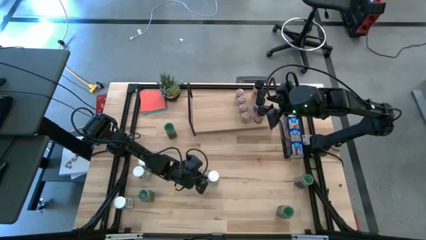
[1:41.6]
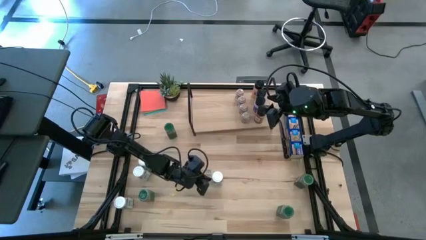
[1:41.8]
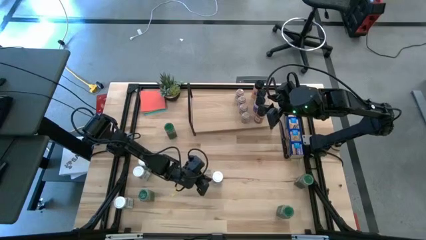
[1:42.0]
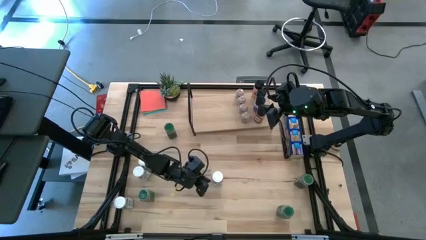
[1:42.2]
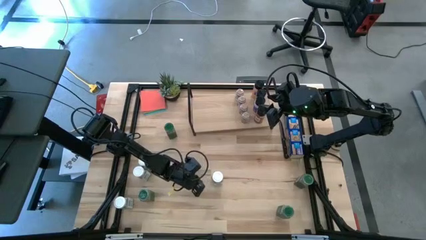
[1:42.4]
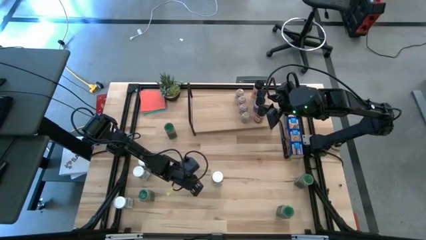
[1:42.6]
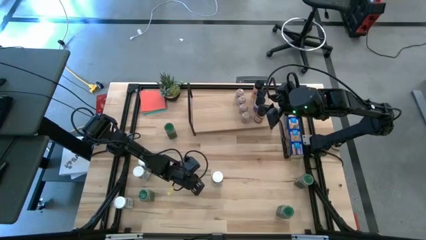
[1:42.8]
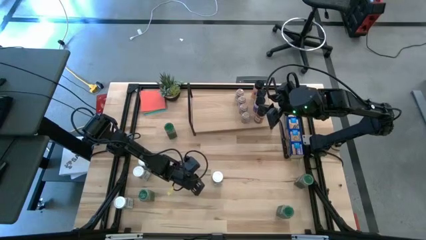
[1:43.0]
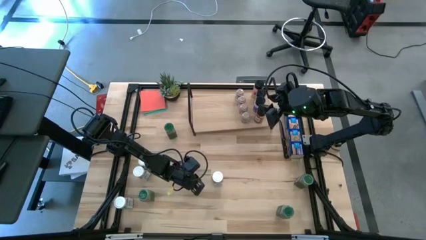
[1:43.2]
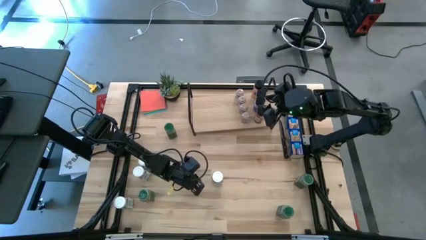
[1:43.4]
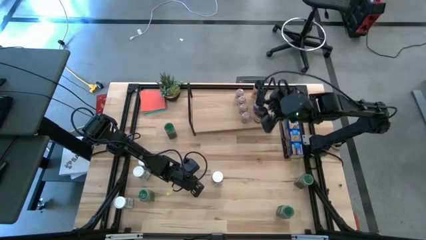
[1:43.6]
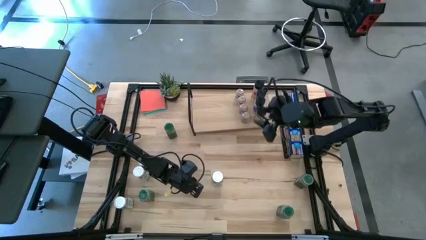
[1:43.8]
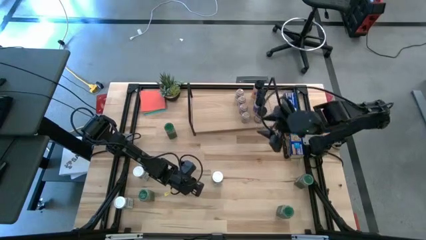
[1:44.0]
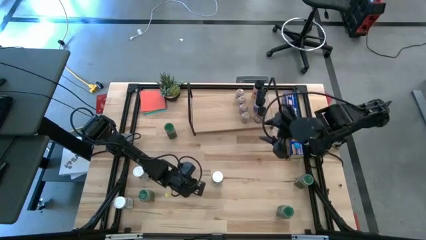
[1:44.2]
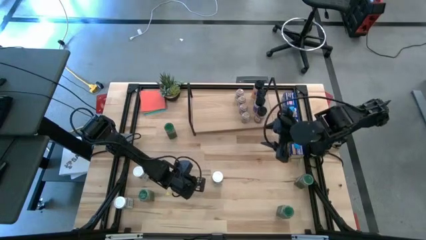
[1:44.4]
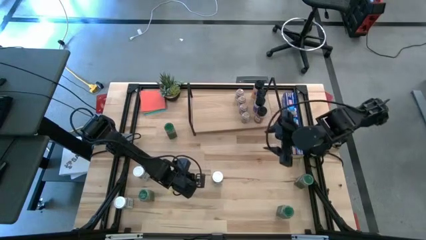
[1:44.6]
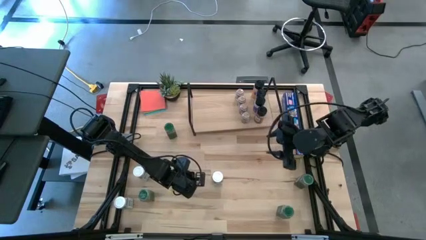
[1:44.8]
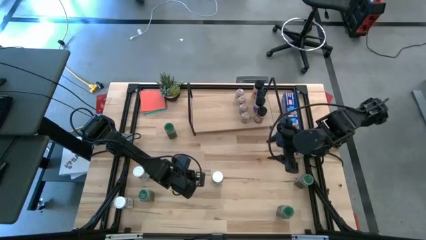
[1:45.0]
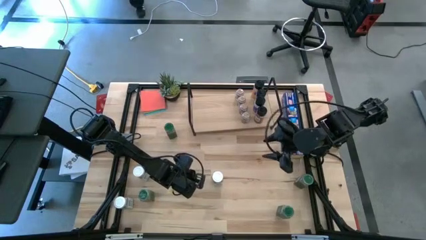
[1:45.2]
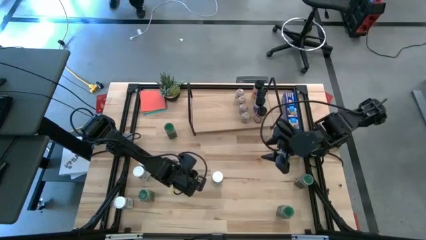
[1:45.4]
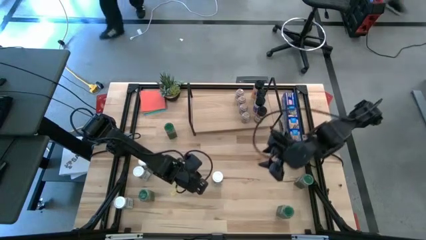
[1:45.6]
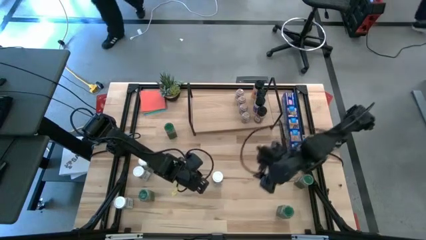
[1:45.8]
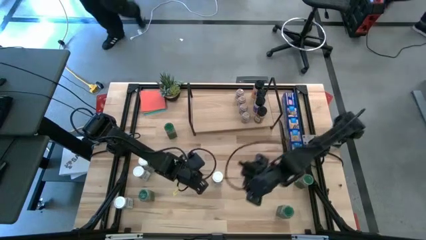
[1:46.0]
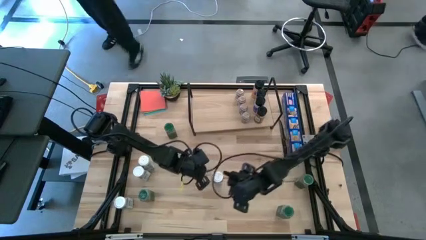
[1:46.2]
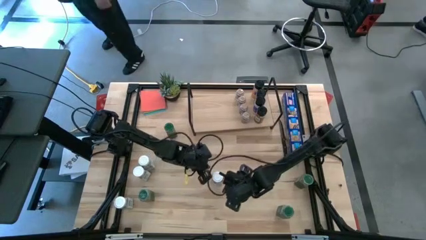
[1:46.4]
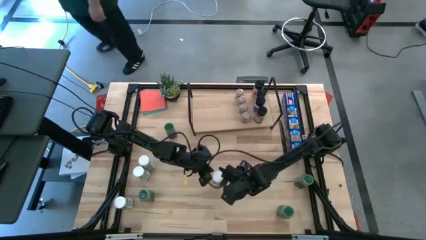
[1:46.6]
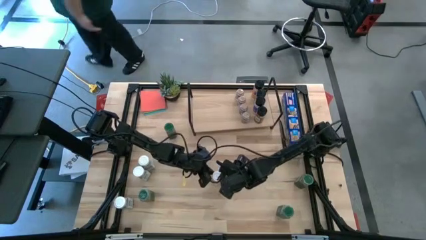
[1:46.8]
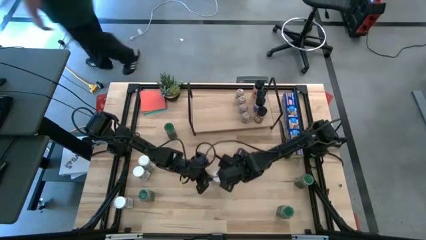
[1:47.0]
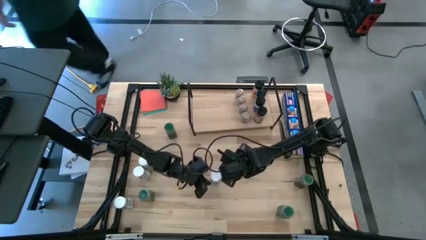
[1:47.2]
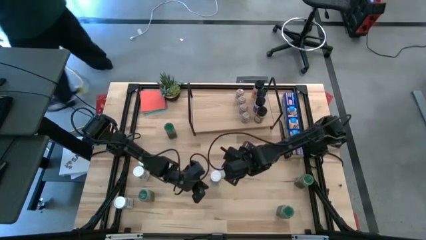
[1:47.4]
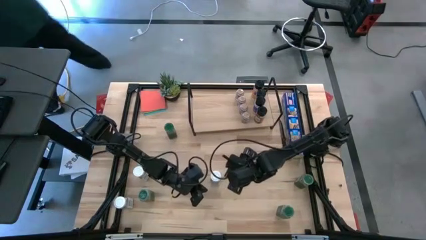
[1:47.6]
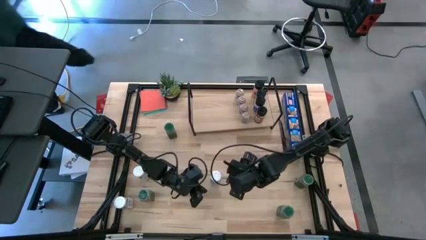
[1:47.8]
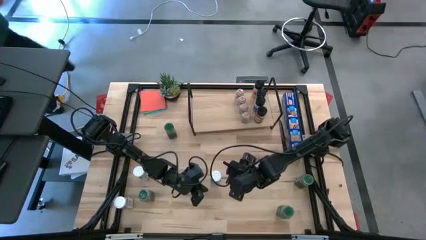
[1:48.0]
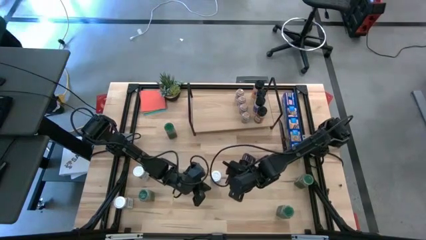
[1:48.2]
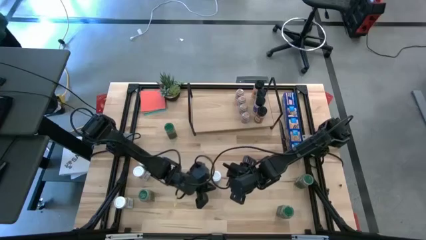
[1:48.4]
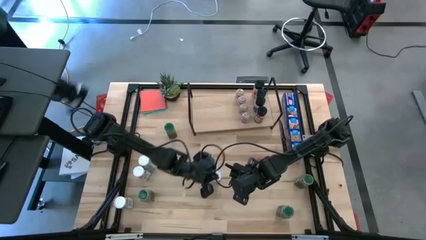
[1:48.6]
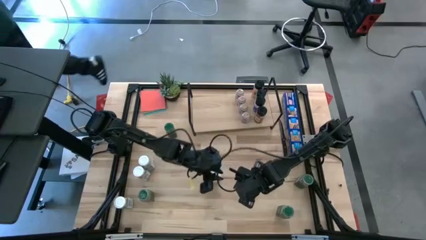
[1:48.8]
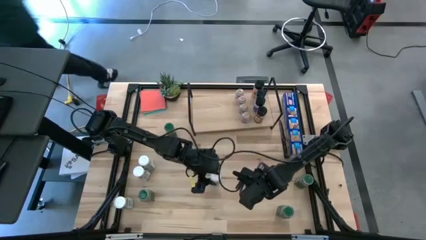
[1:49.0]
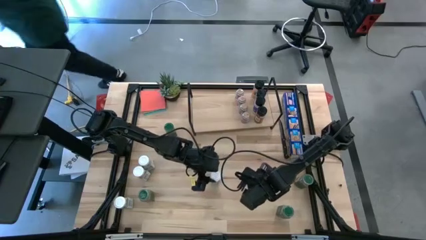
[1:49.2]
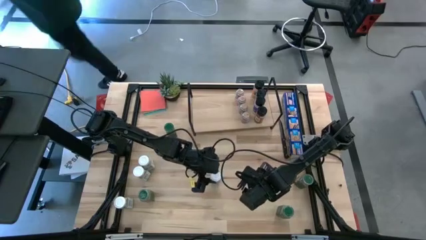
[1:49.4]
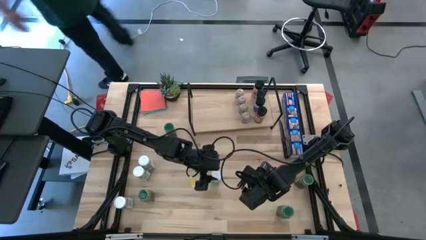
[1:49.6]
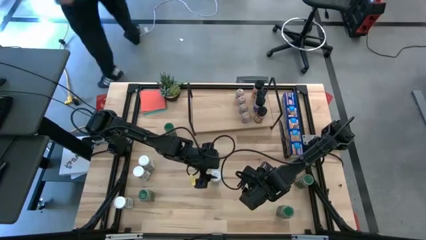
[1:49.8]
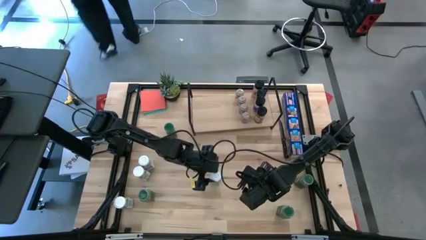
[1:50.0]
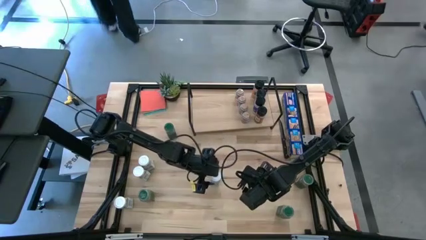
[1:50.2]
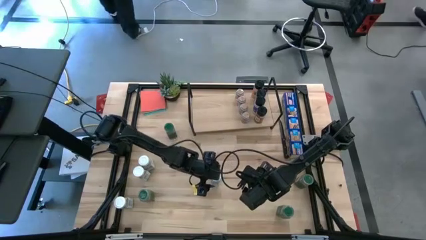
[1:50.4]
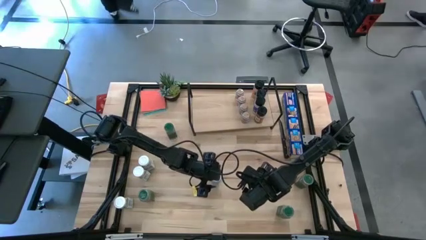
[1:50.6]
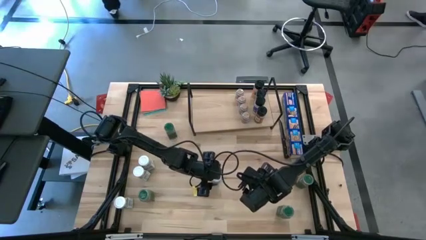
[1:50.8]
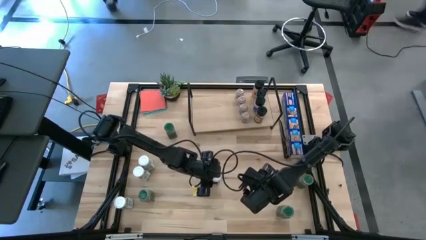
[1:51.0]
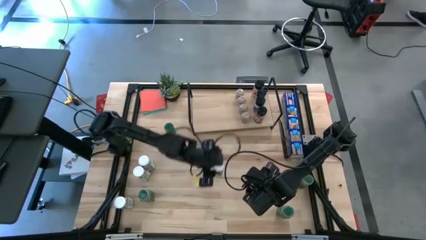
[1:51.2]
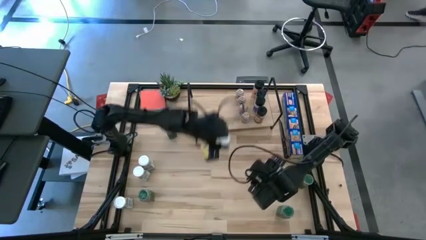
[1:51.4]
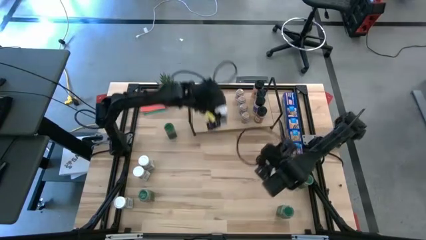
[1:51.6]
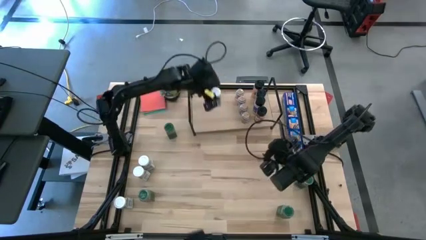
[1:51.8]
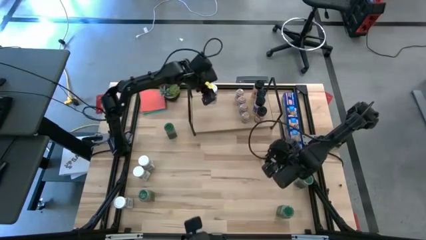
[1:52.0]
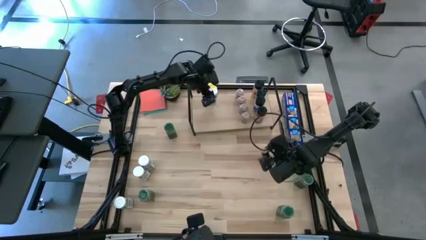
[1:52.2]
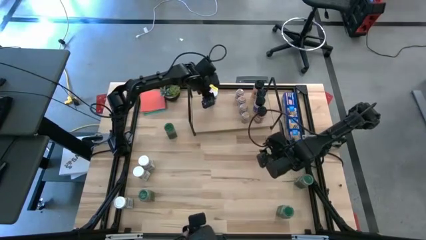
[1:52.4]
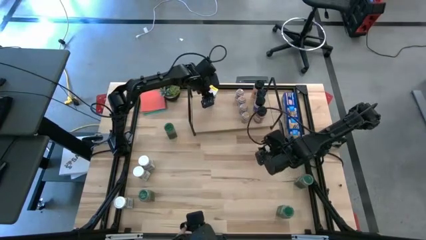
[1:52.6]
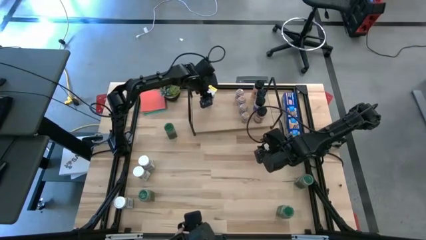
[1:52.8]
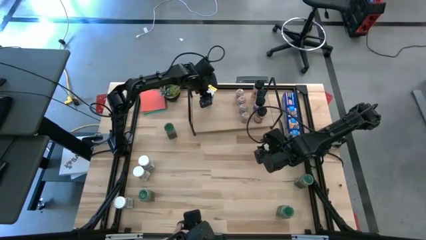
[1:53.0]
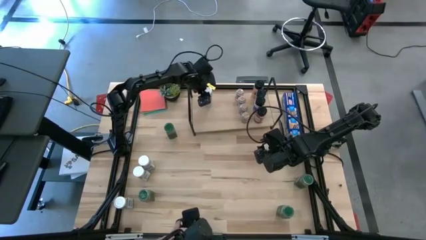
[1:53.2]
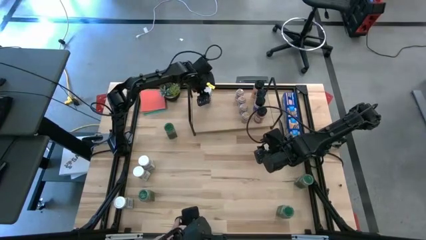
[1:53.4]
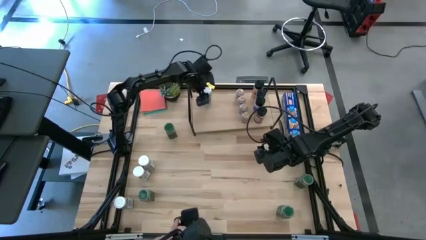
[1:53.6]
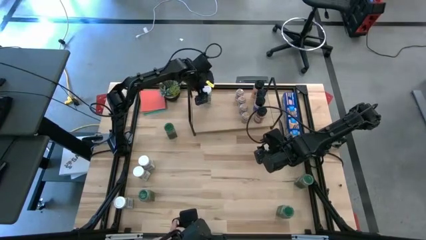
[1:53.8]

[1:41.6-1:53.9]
Task: Shelf spices
Put the white seasoning bottle on the shelf

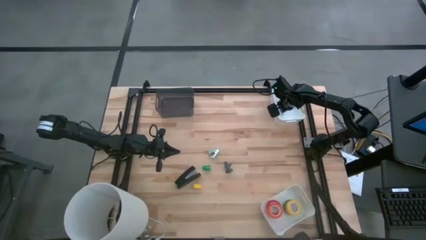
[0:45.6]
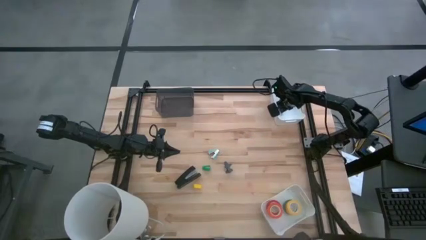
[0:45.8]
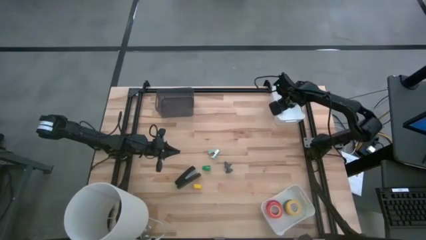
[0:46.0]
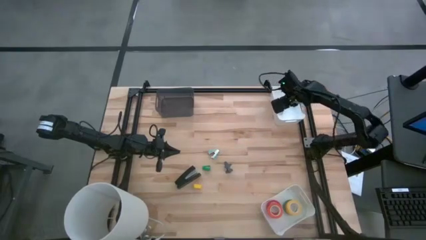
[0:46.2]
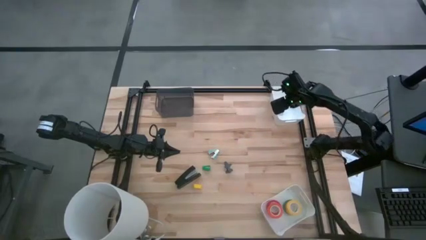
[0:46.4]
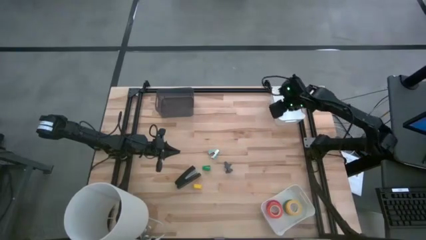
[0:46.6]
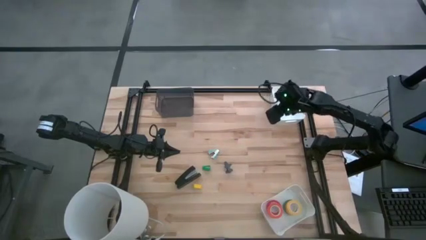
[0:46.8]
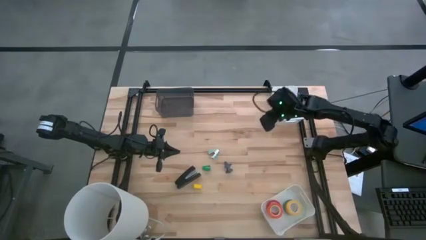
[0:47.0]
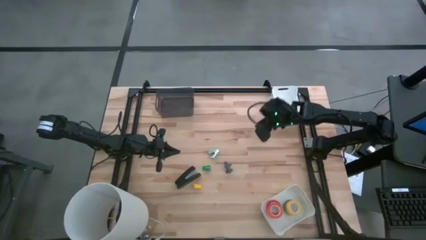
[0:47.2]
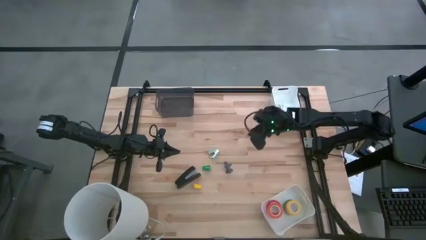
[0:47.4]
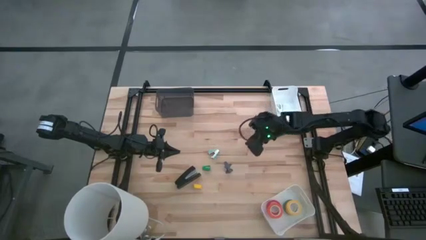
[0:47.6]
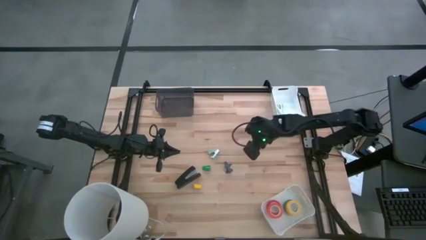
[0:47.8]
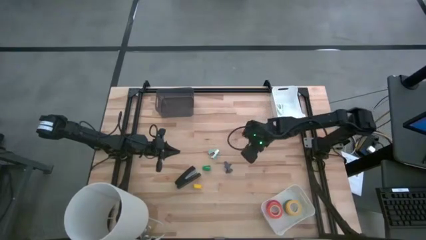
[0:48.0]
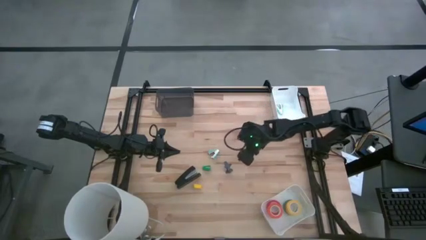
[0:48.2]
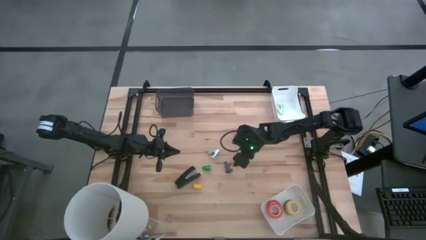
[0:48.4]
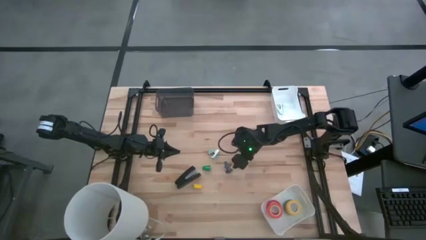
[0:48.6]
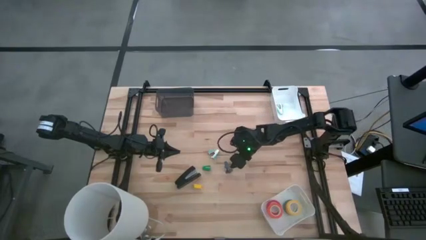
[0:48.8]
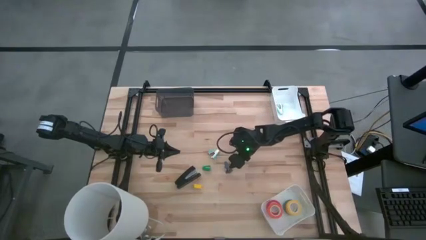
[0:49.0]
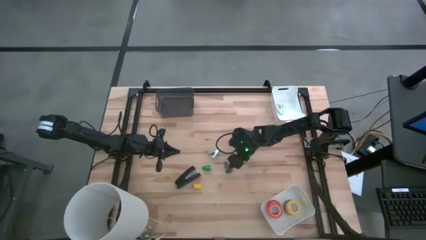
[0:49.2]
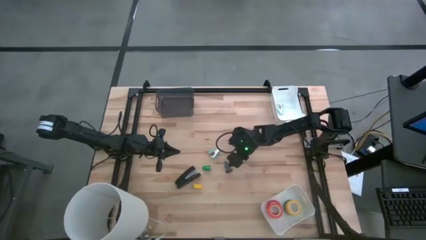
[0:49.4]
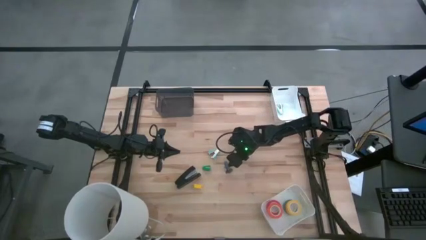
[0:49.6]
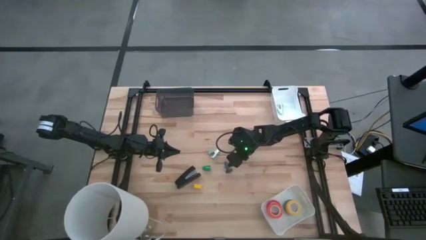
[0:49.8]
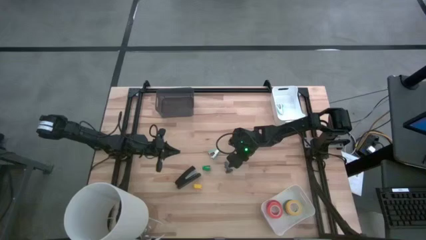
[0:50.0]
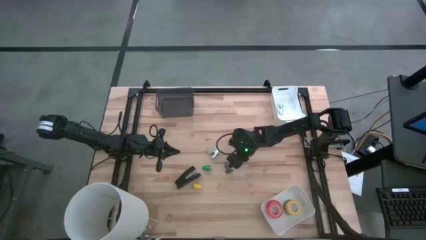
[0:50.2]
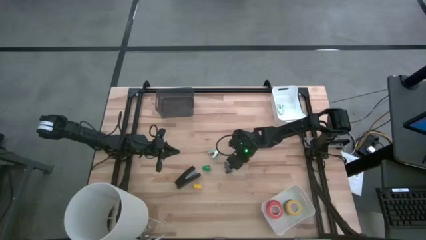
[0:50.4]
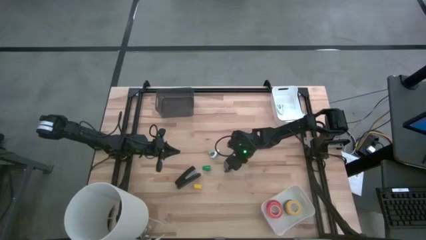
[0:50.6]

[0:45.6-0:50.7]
Task: Pick and place Stapler, Stapler remover, tape
Put the blue staple remover into the top white bin
